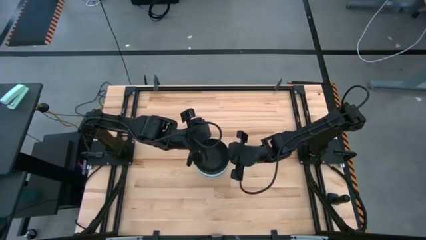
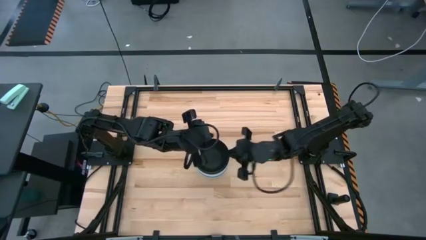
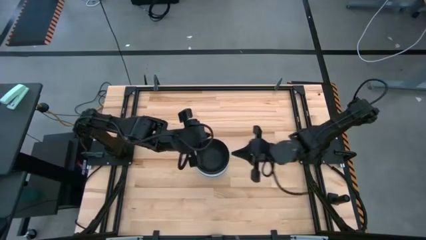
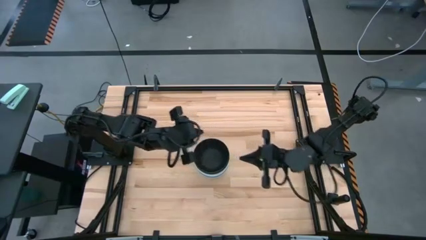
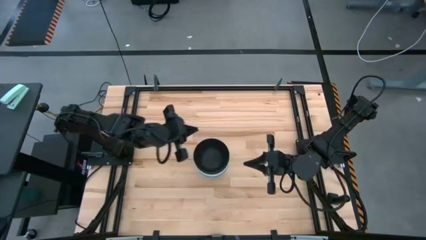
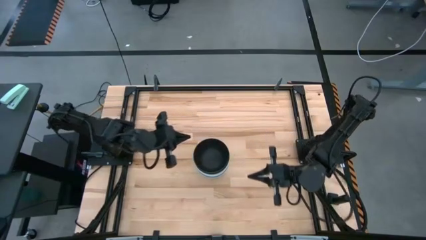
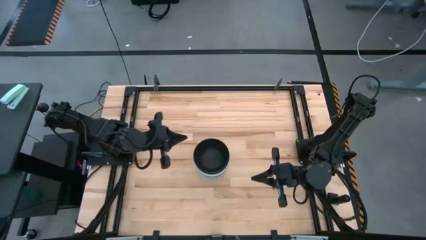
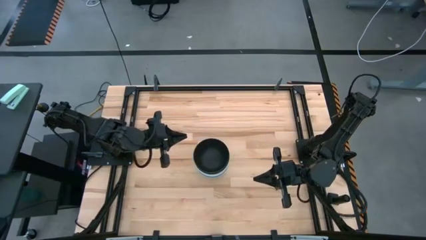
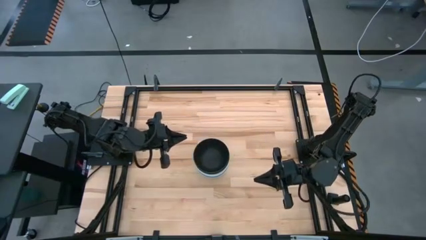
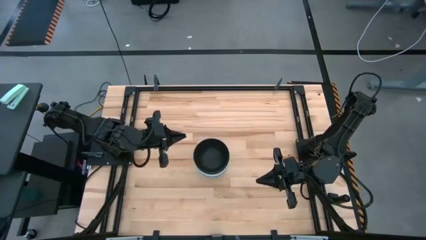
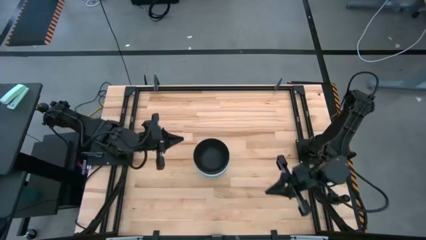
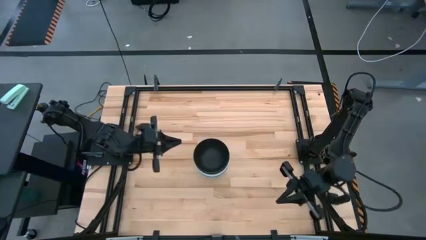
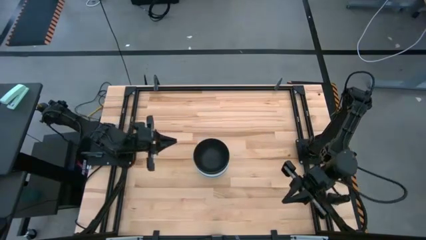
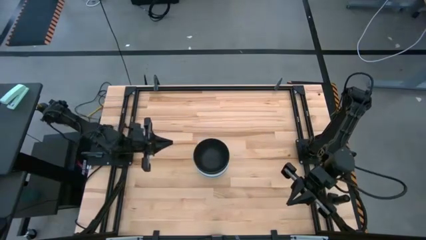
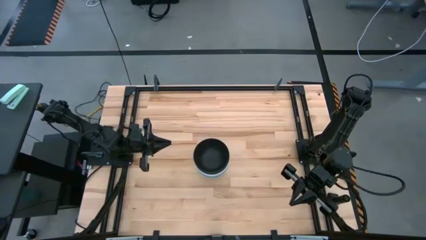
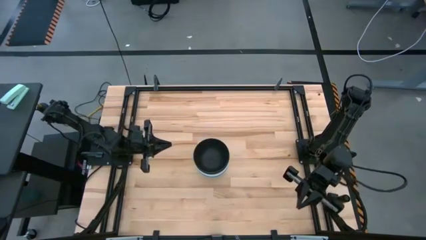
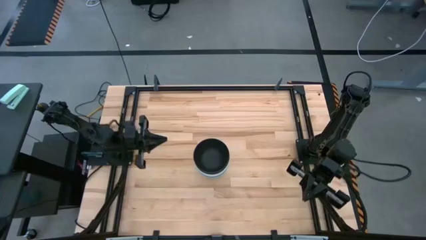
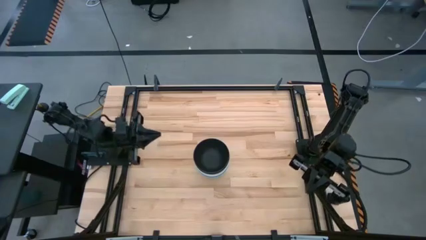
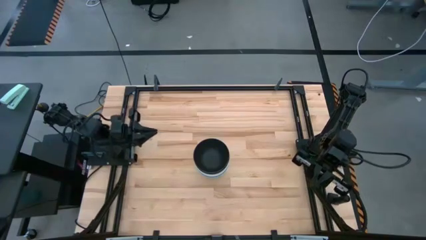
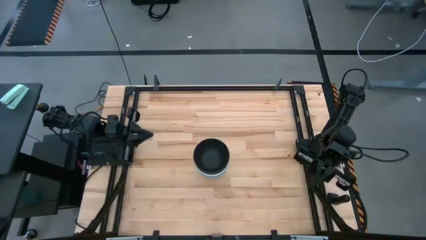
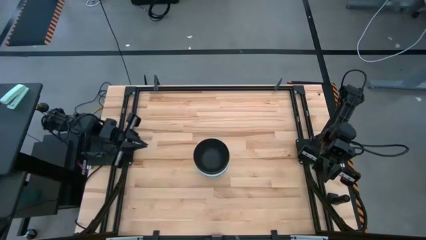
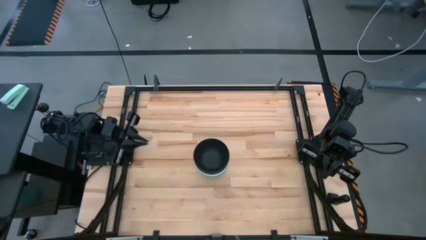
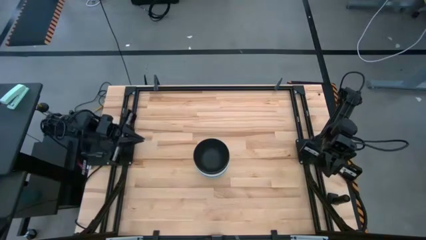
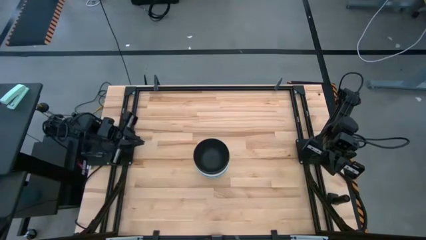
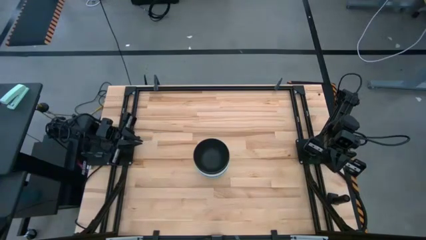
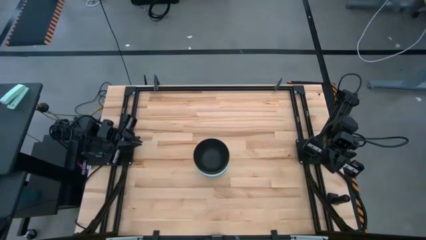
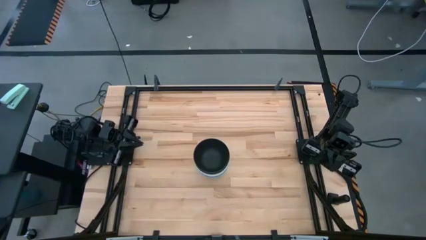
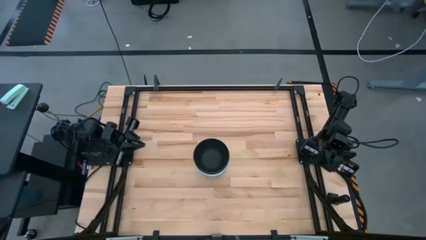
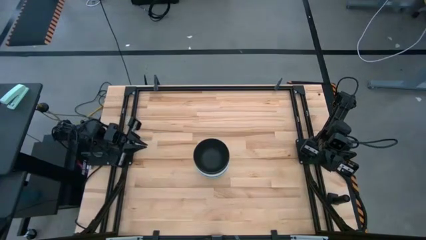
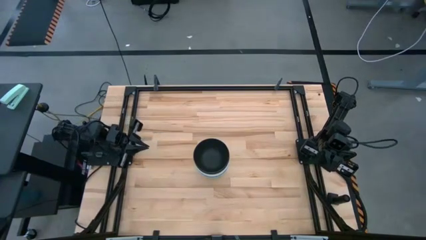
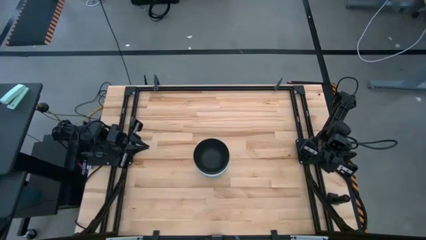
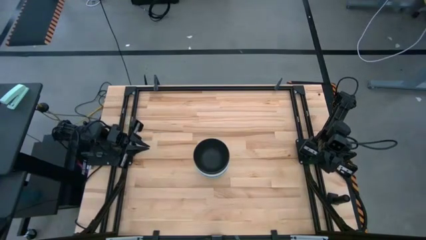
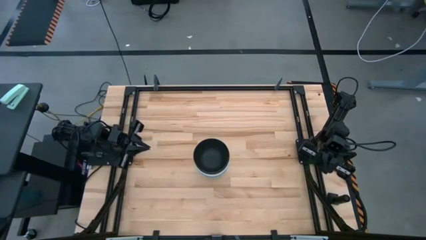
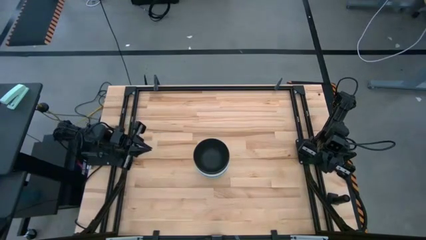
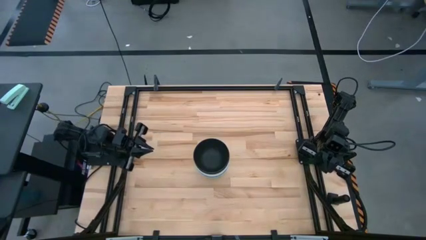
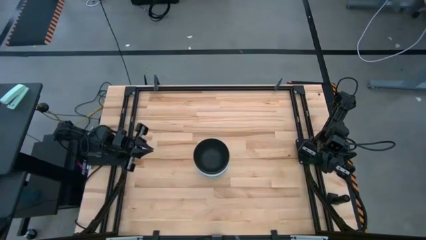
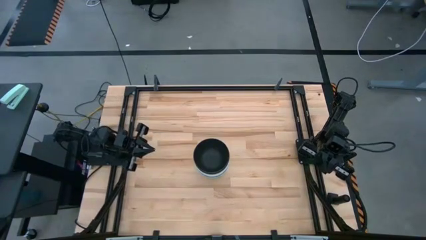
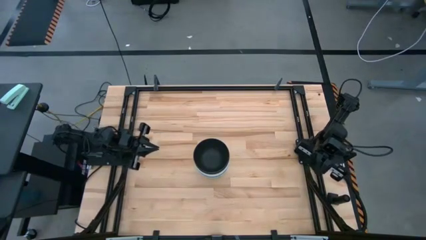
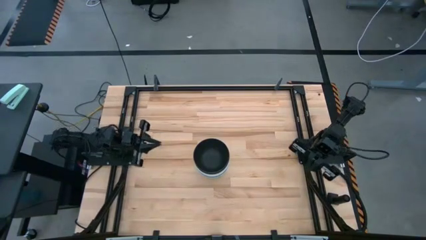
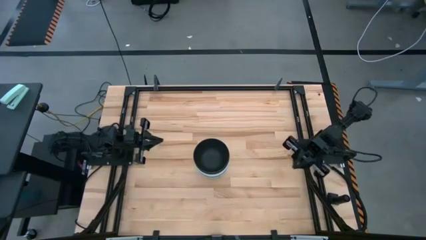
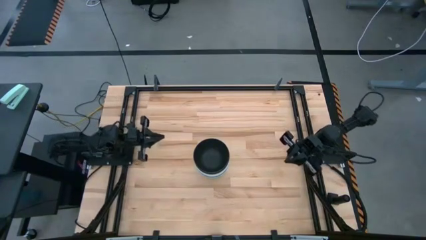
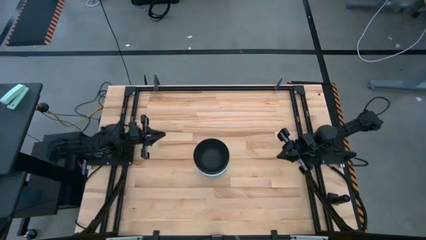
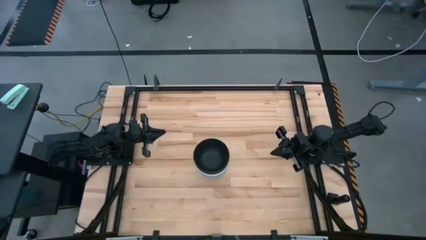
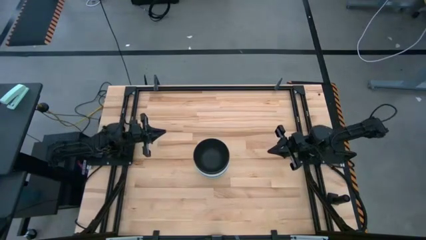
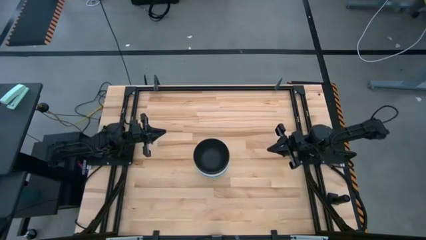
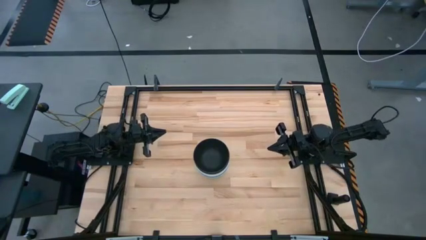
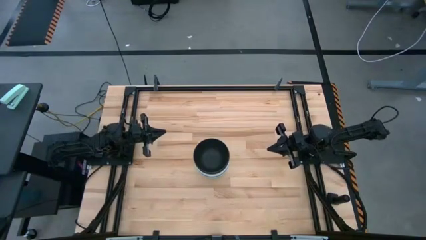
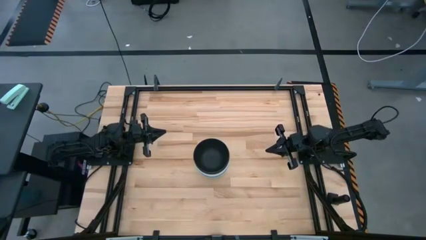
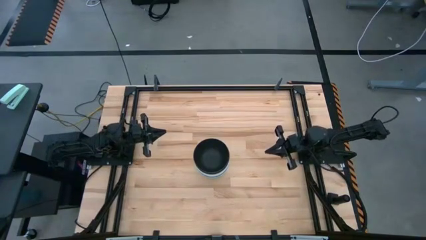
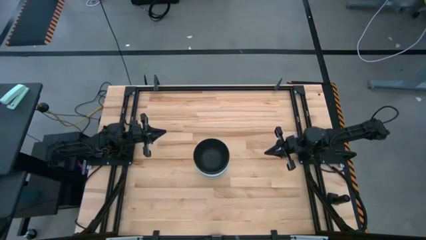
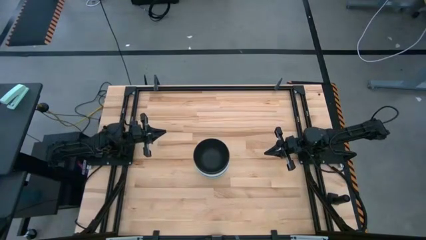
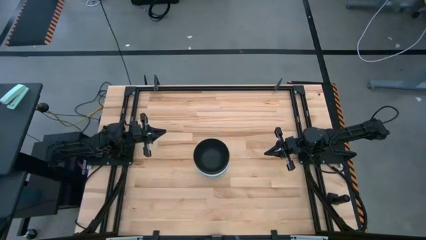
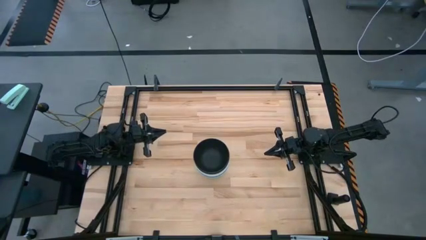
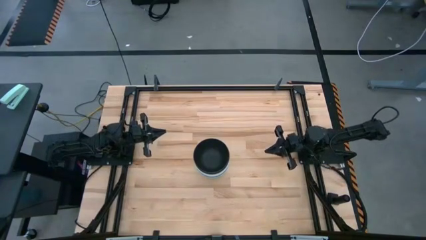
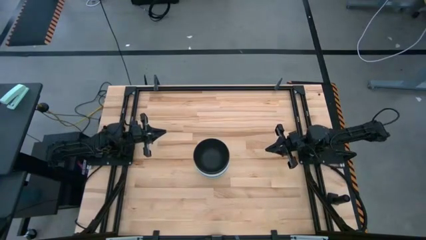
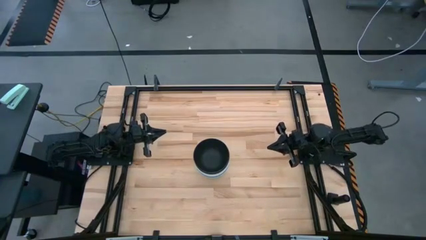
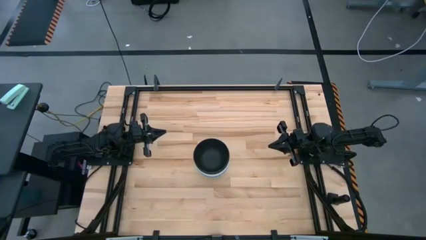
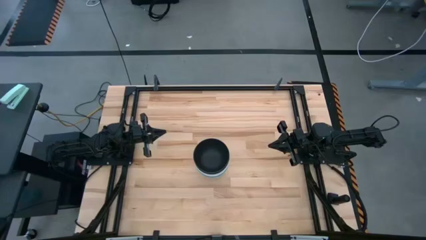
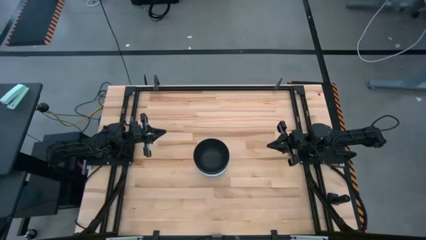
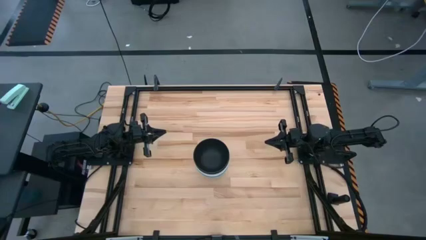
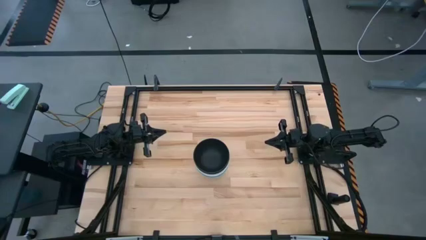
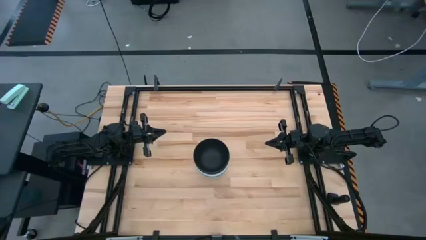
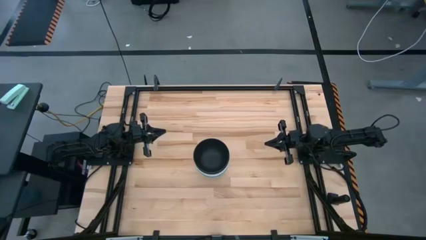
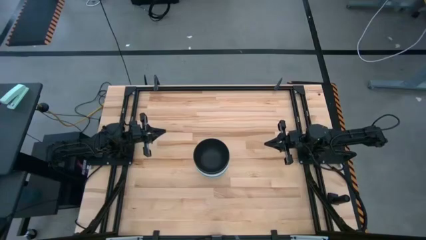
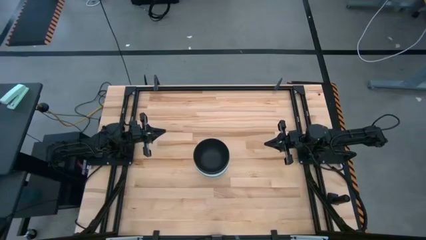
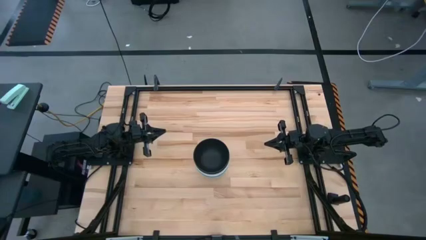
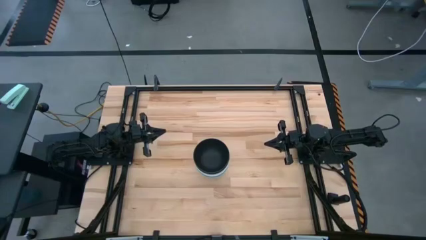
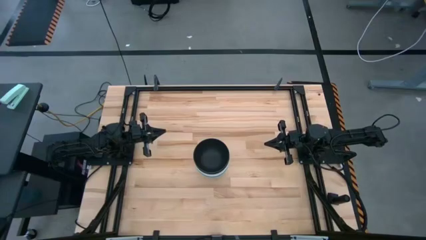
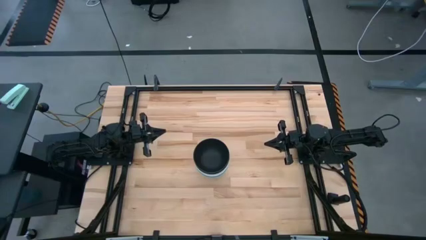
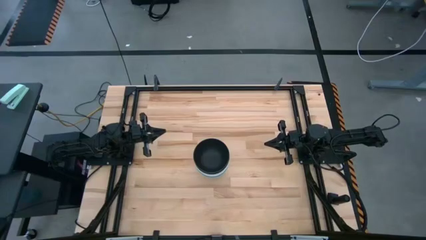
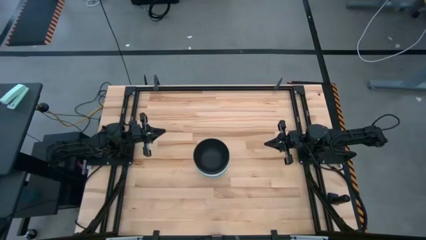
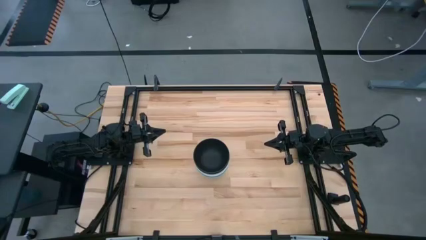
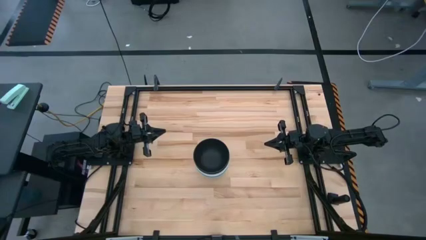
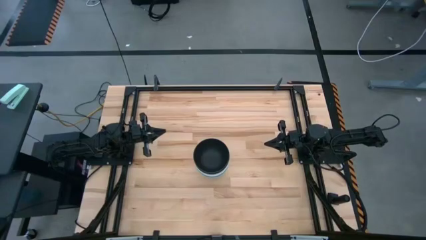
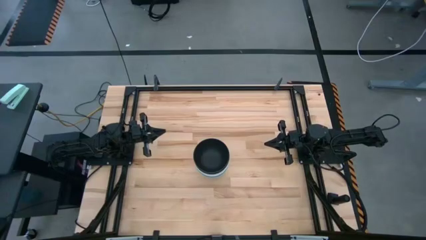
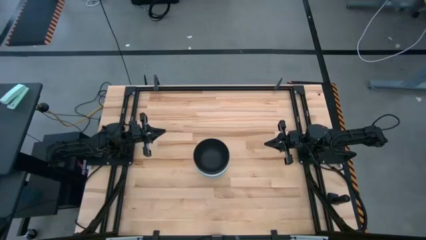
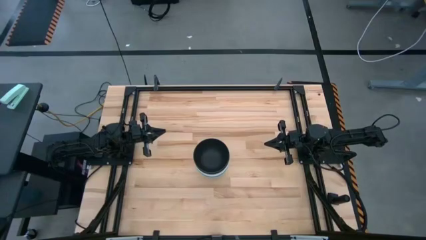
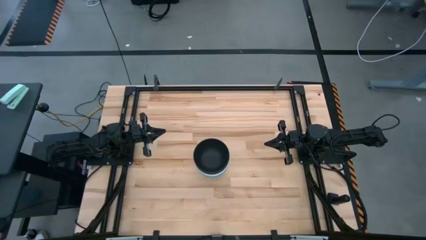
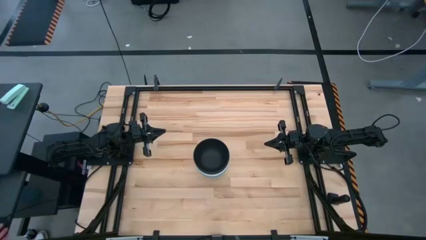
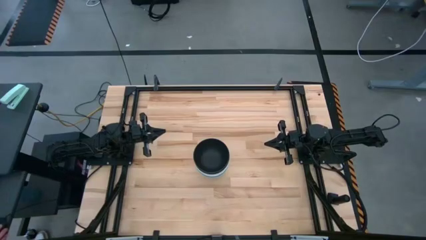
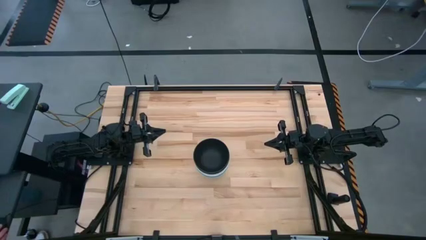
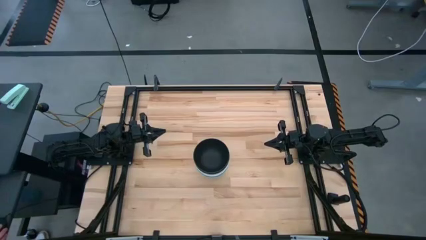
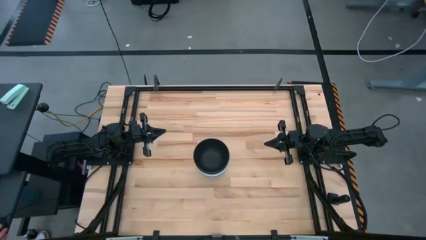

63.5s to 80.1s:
Task: Nest bowls inside each other
Return to Home Position
